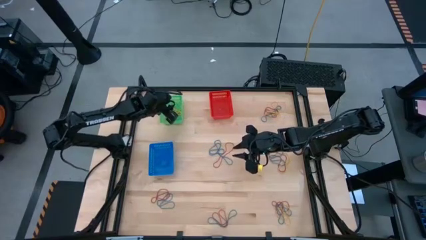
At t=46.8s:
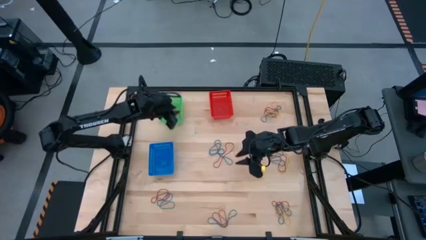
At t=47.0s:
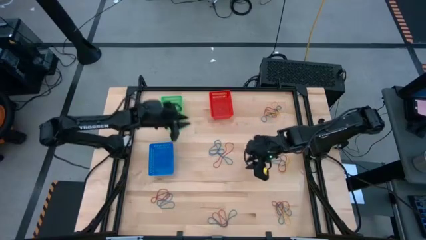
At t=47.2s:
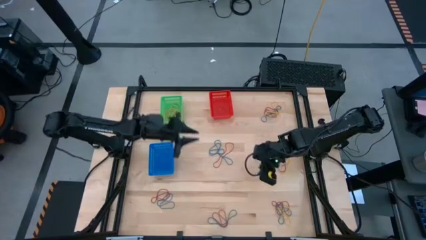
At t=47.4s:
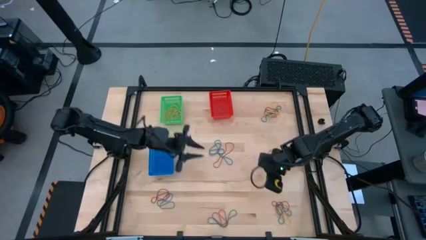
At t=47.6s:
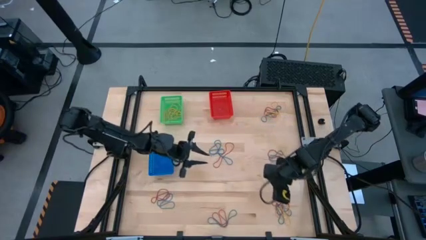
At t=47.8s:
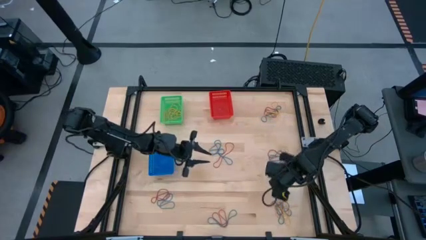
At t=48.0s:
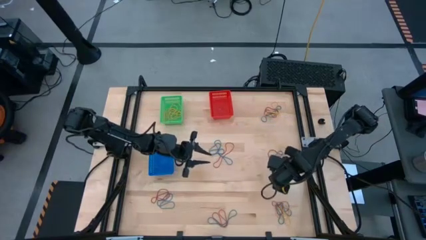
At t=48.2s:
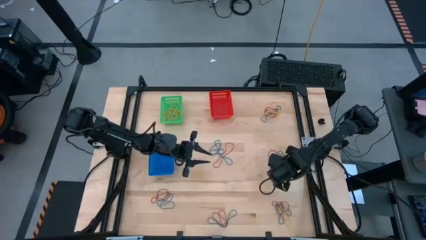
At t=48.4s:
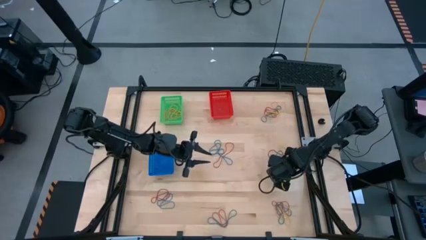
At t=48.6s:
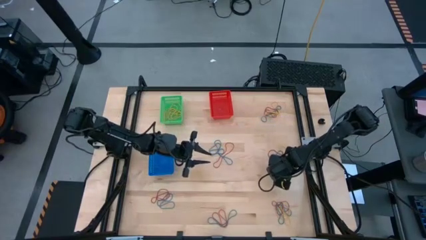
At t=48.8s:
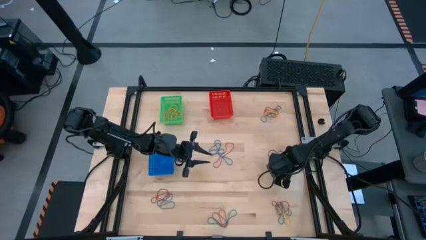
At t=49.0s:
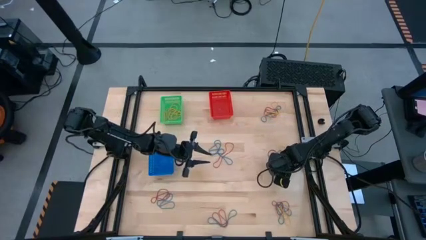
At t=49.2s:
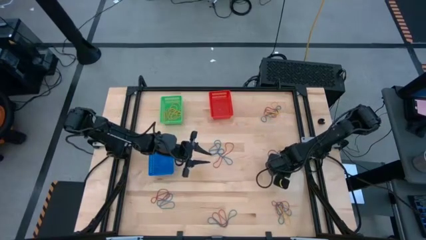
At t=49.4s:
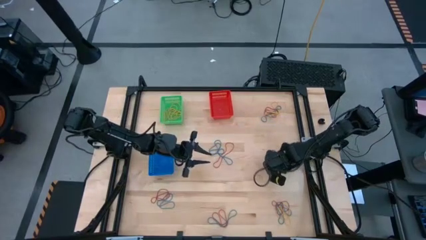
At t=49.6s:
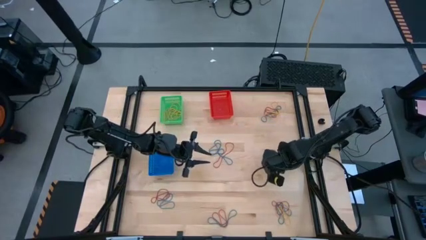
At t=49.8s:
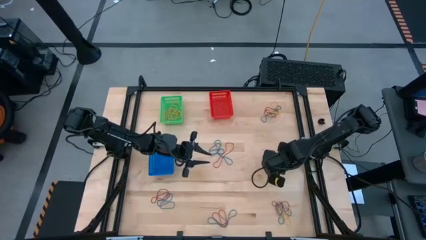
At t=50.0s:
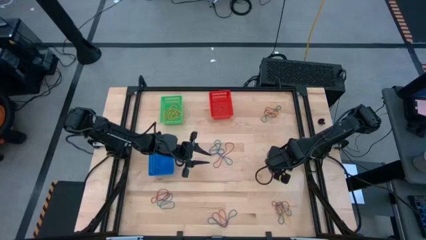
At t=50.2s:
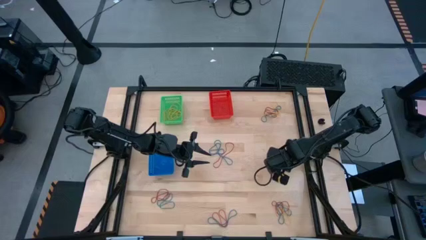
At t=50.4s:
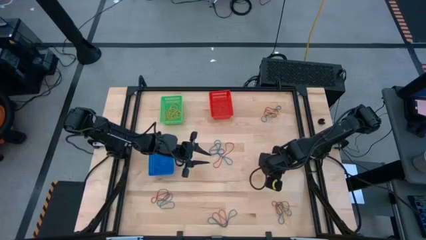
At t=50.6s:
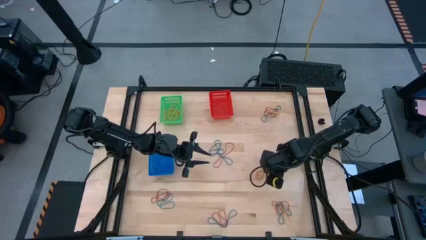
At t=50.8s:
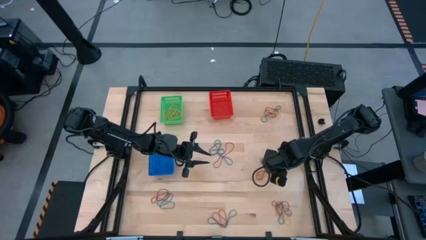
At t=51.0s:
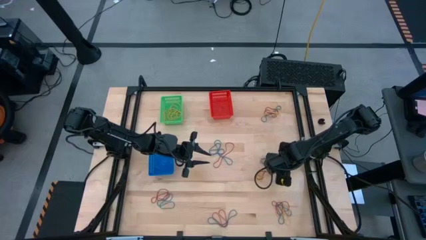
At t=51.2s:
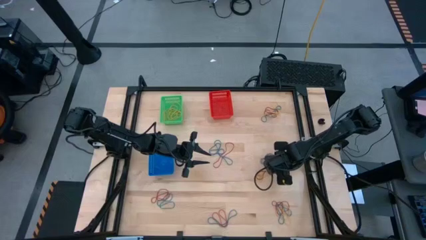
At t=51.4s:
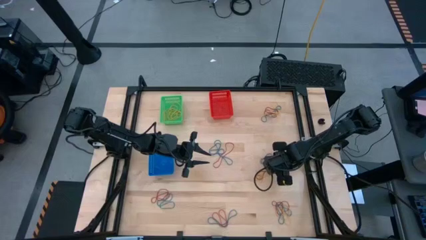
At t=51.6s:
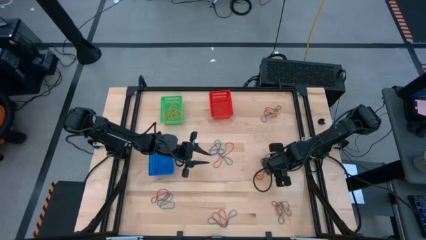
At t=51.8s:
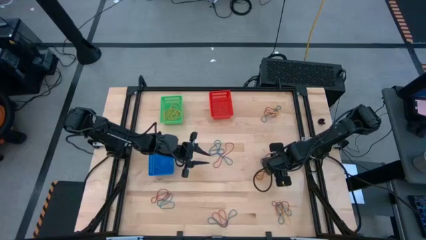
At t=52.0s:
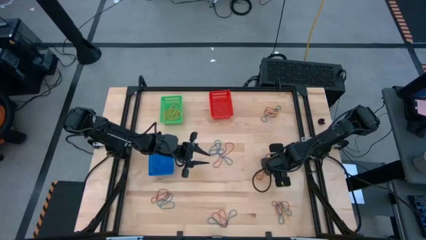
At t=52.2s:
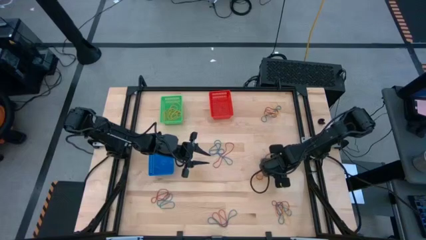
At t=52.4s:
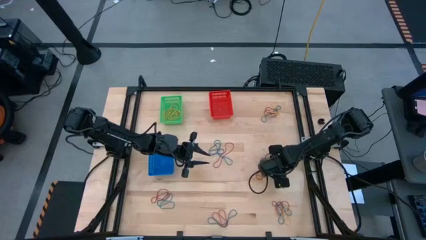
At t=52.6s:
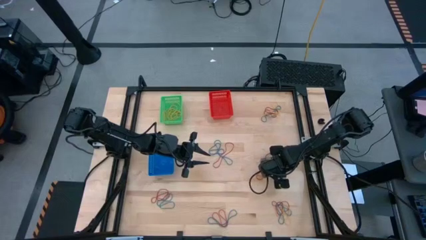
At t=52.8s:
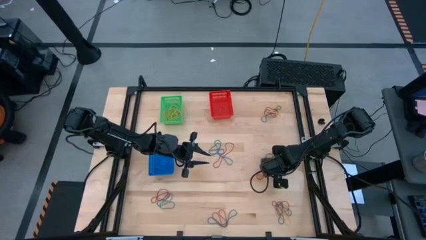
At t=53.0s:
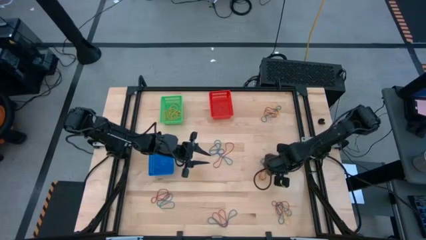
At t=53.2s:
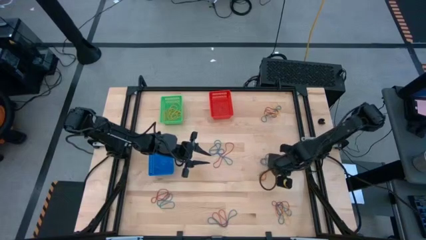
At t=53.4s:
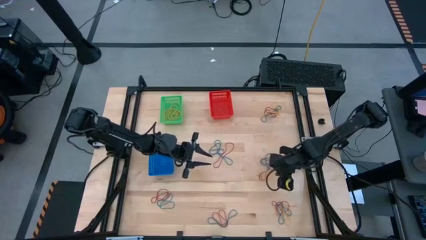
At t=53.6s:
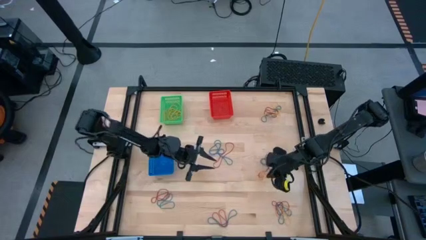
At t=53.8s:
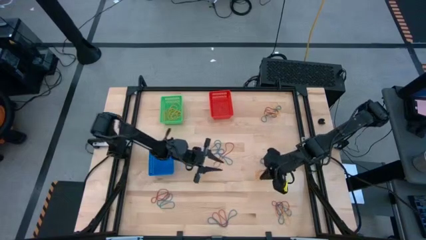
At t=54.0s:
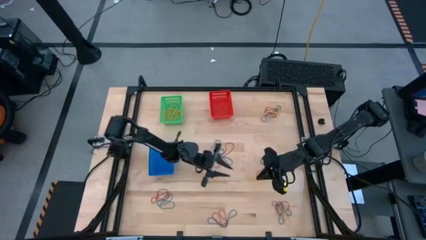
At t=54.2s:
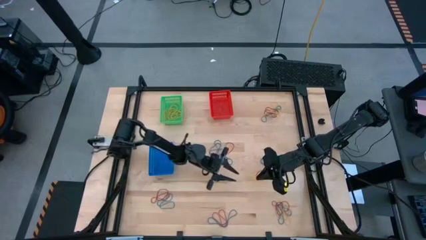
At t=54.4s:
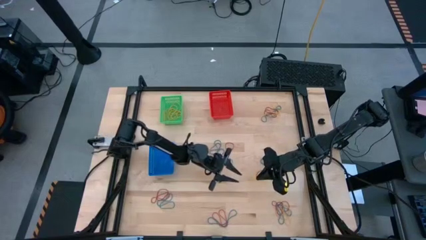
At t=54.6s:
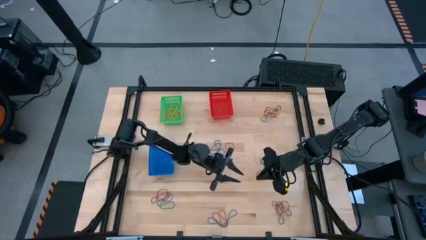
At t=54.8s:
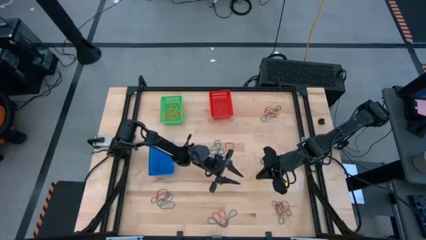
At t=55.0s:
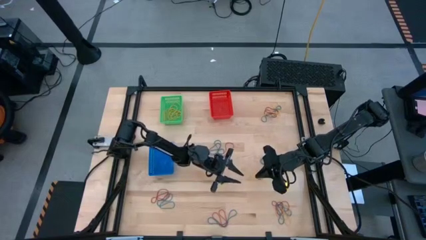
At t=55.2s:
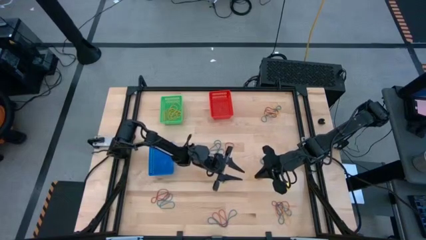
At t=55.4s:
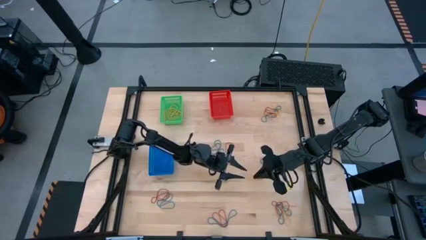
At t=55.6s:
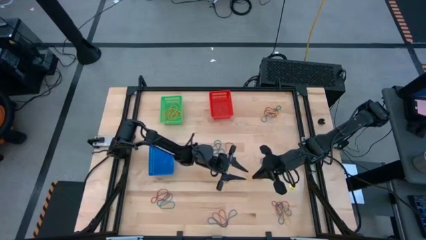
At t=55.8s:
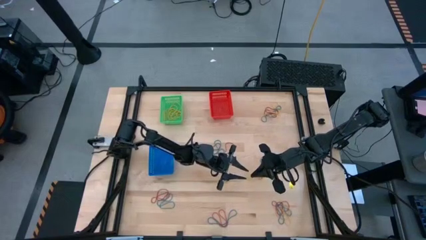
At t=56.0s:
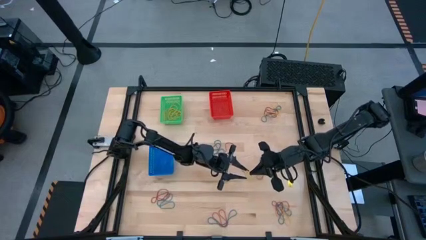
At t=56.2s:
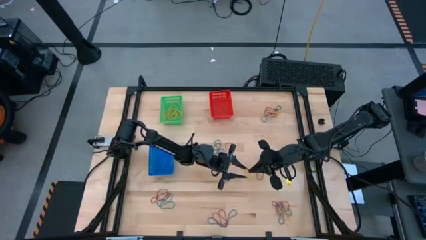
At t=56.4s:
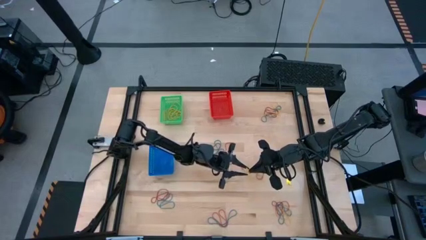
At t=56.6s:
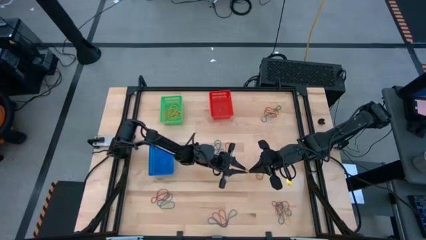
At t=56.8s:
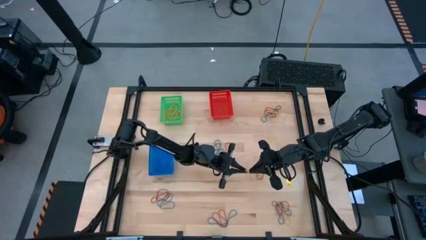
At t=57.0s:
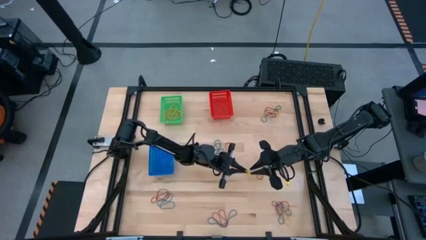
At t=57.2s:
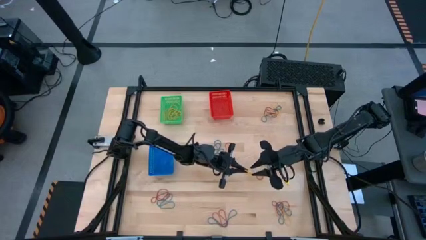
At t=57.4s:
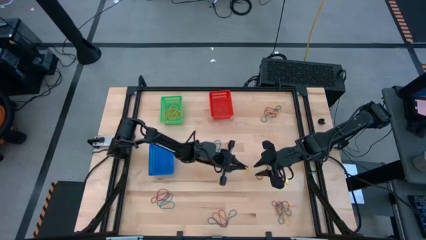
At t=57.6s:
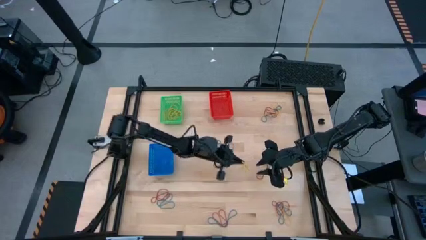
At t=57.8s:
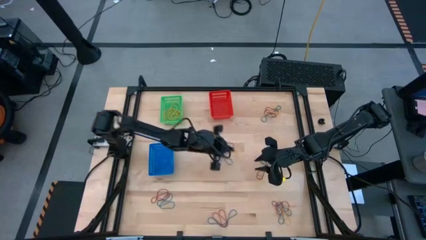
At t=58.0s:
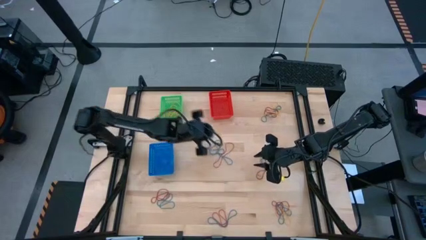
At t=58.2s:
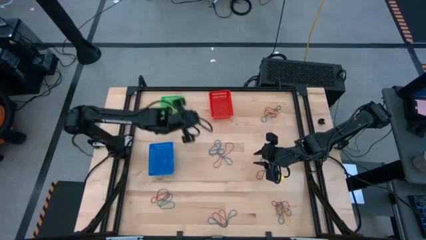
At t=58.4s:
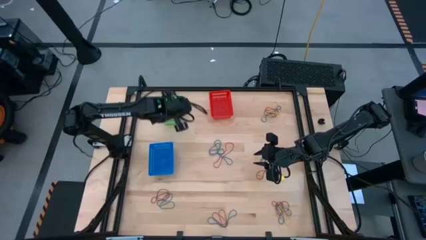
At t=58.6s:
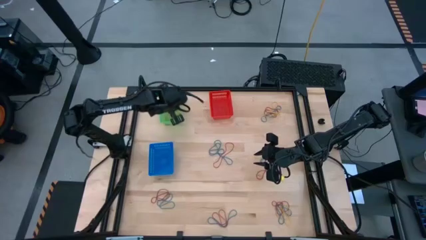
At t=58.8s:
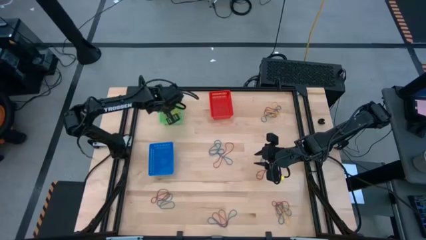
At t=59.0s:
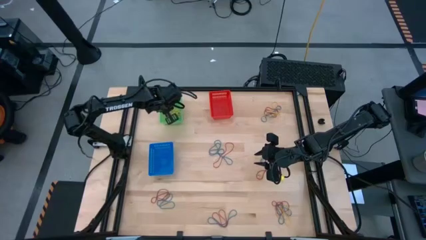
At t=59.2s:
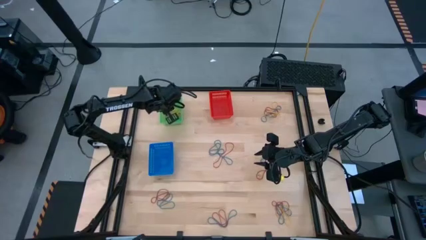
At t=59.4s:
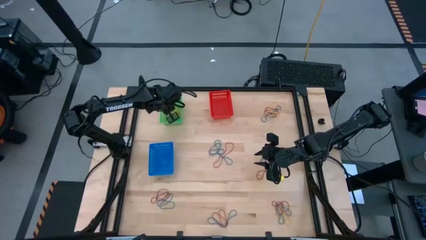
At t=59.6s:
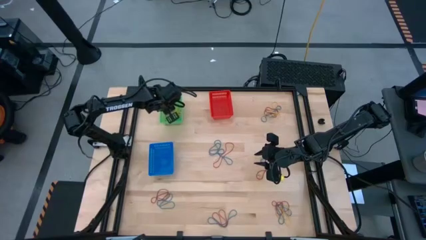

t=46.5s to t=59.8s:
Task: Sort rubber bands into baskets
Put the yellow rubber band into the green bin

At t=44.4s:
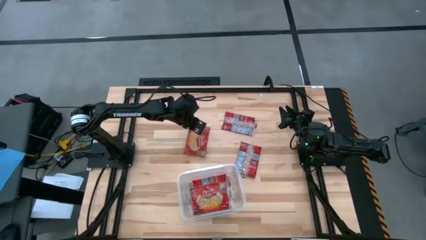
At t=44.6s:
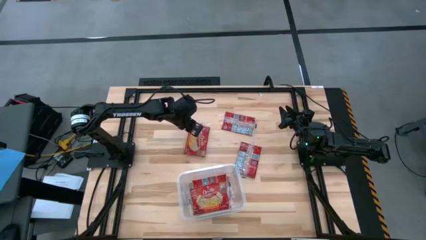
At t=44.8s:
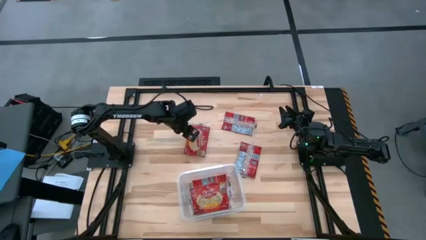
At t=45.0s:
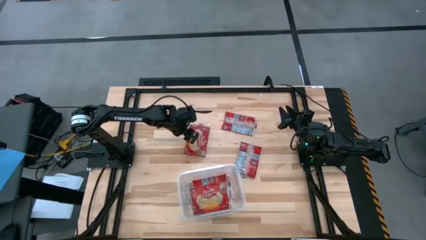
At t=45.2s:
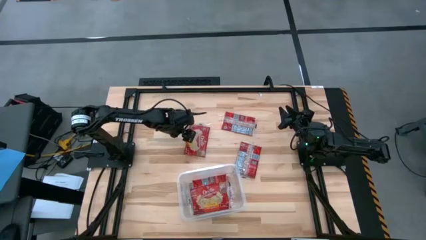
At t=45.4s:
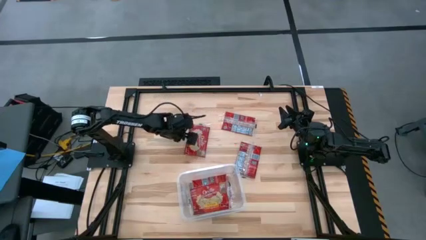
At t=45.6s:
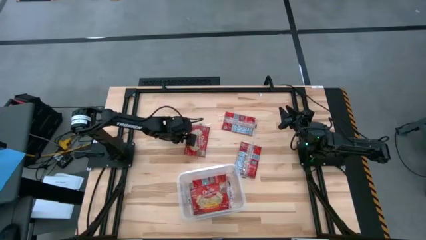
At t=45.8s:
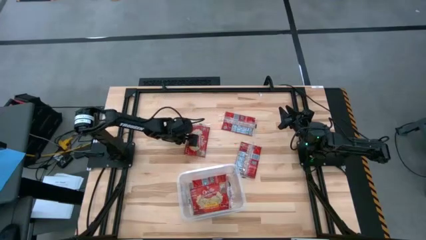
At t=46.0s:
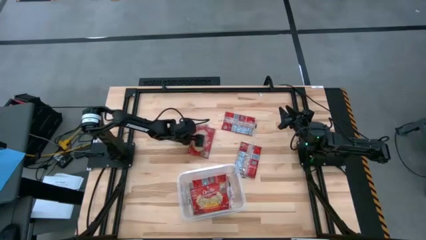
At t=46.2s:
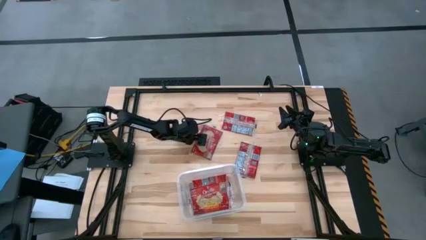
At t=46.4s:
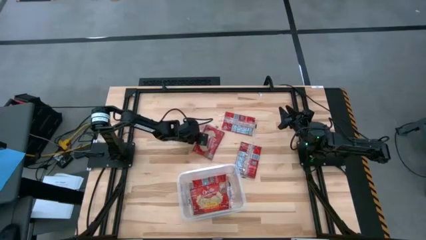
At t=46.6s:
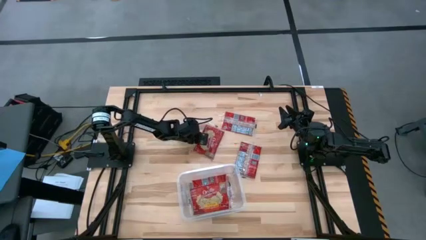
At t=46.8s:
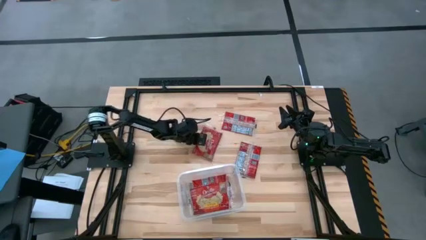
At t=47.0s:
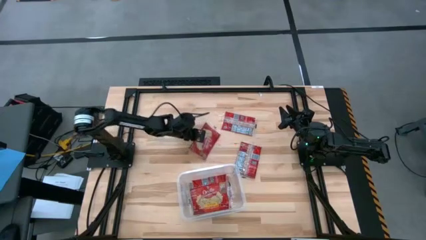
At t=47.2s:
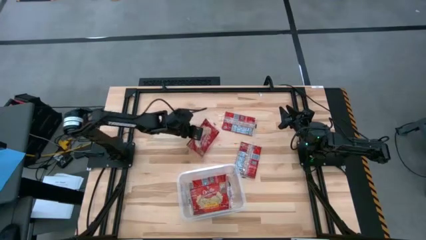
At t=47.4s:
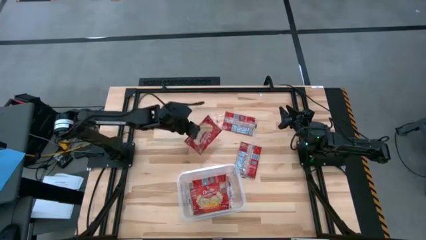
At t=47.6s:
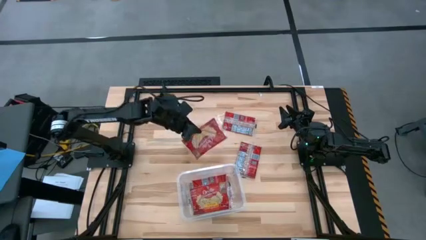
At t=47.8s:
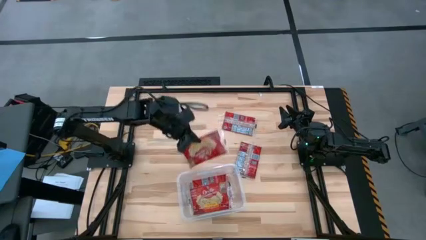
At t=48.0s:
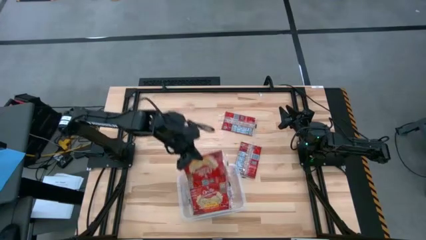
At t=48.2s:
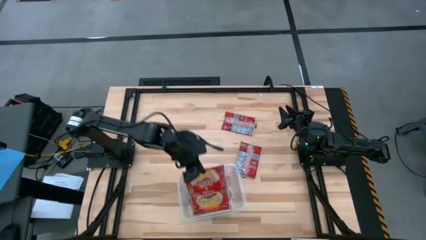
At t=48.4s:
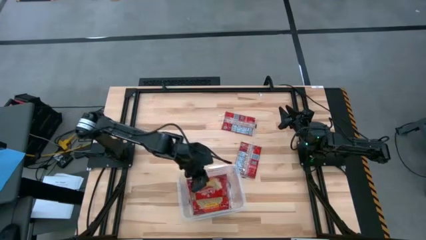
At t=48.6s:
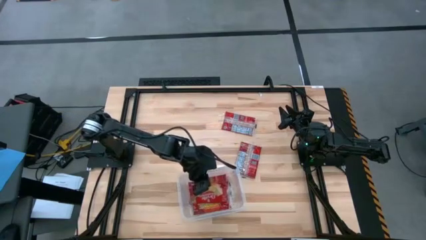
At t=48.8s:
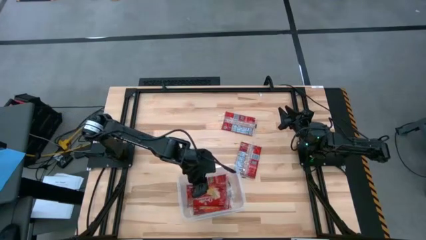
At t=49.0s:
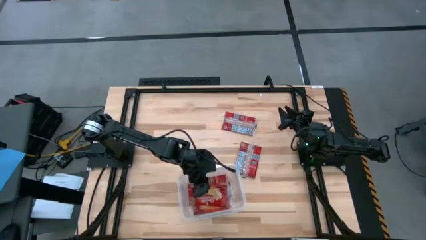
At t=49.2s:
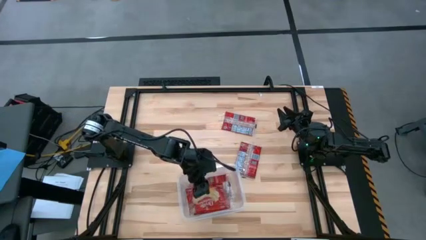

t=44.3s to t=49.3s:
Task: Sort popcorn bags into baskets
Put the red popcorn bag into the transparent container
